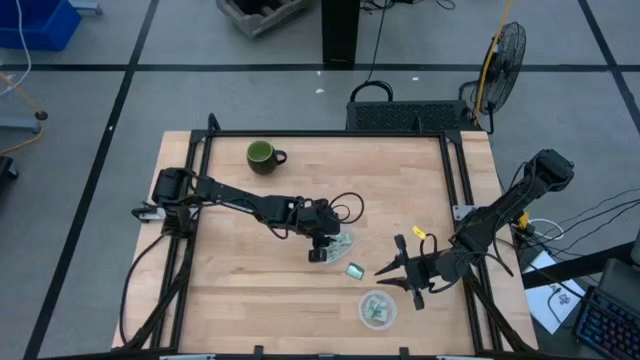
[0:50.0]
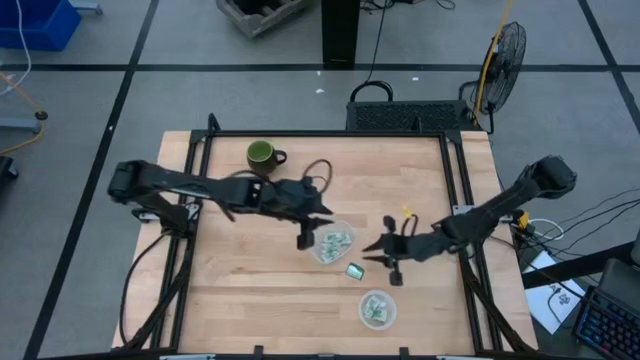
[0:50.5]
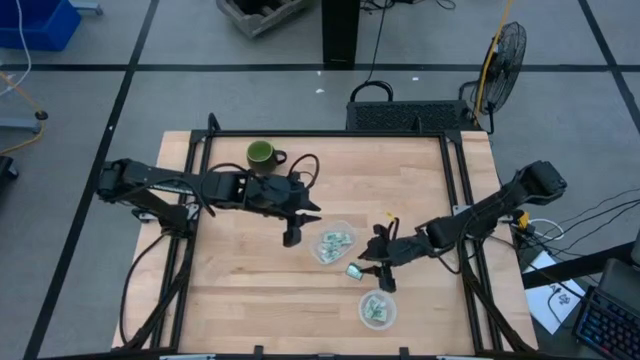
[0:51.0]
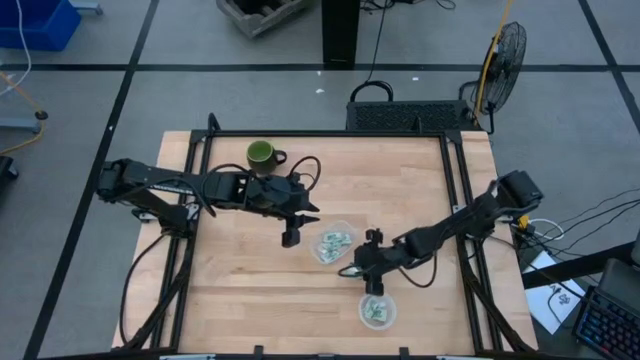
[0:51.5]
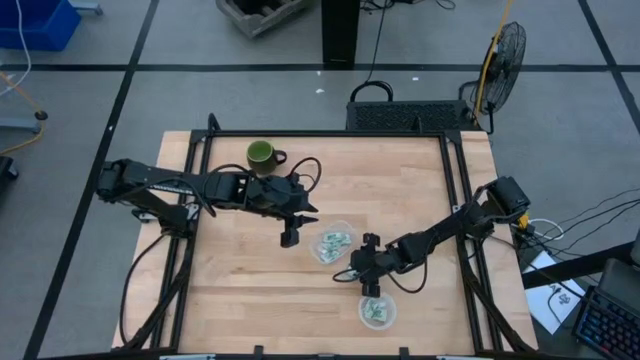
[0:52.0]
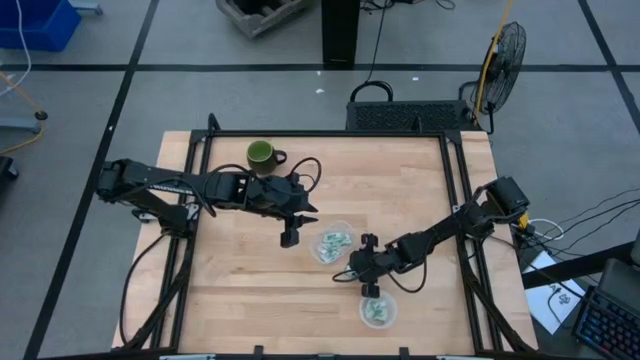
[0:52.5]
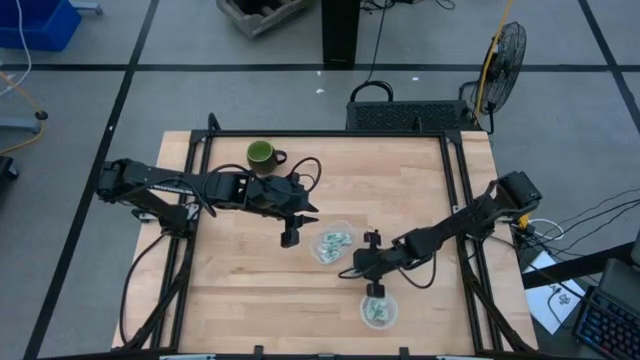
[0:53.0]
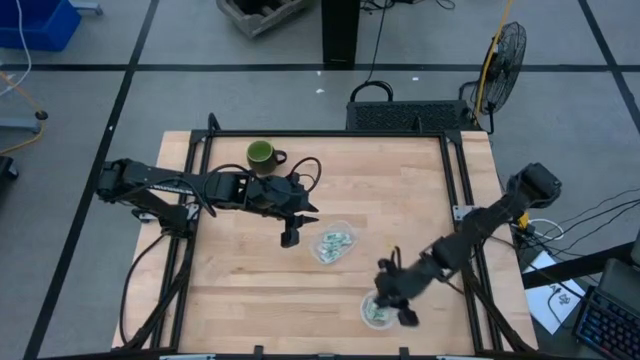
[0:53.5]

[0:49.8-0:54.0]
Task: Pick and place Stevia / Truvia into bins
Put the truvia packet into the bottom transparent container

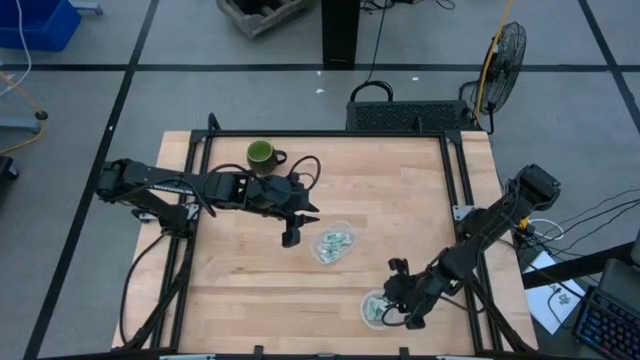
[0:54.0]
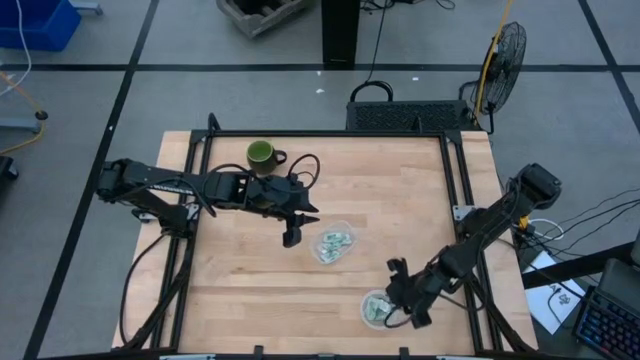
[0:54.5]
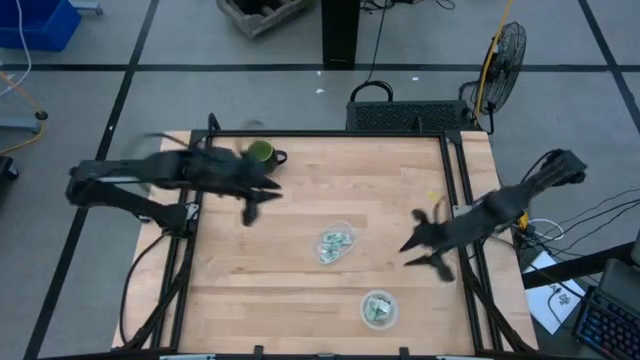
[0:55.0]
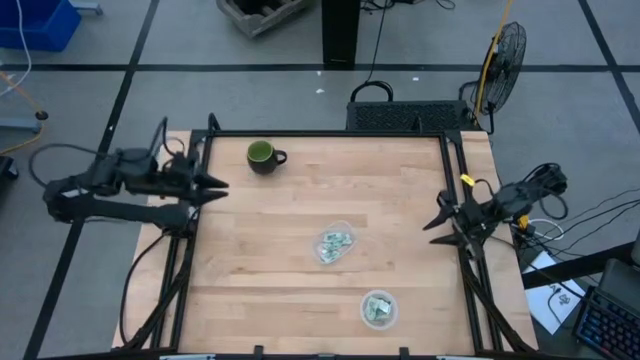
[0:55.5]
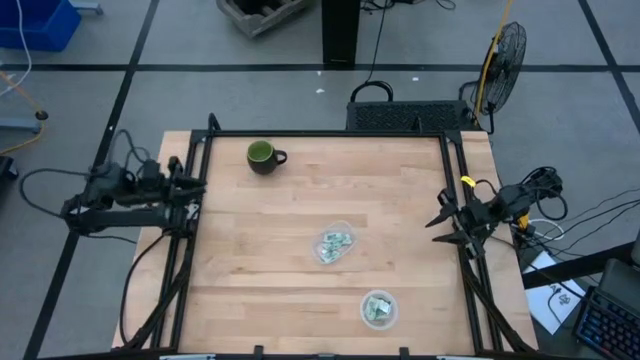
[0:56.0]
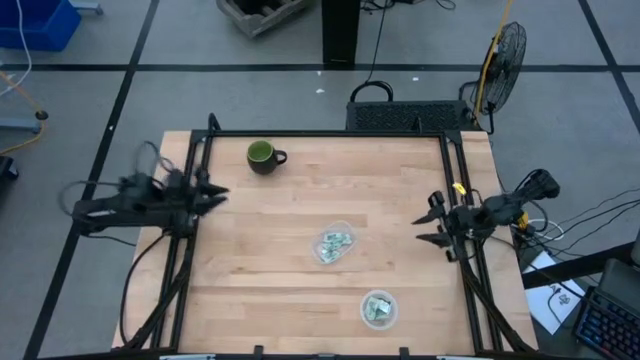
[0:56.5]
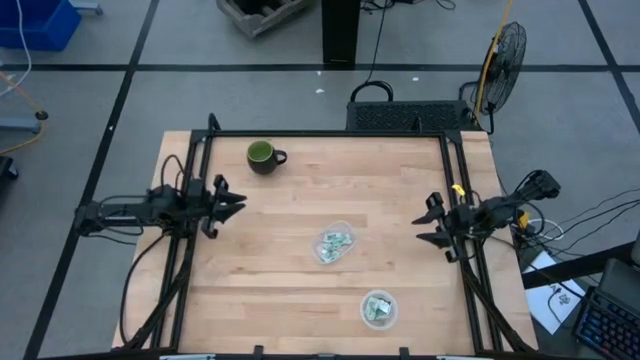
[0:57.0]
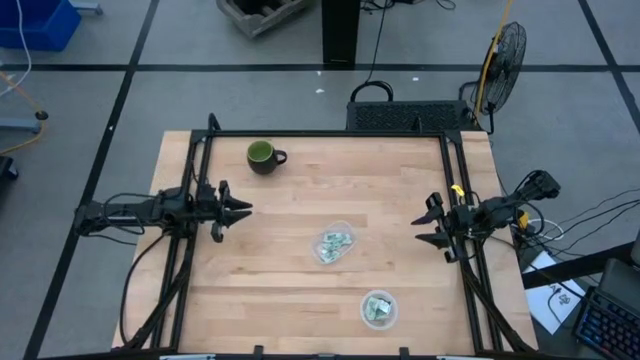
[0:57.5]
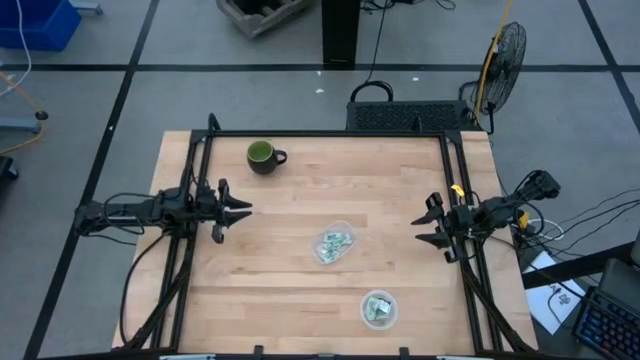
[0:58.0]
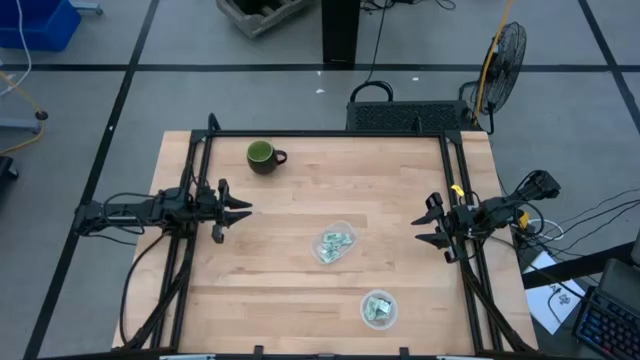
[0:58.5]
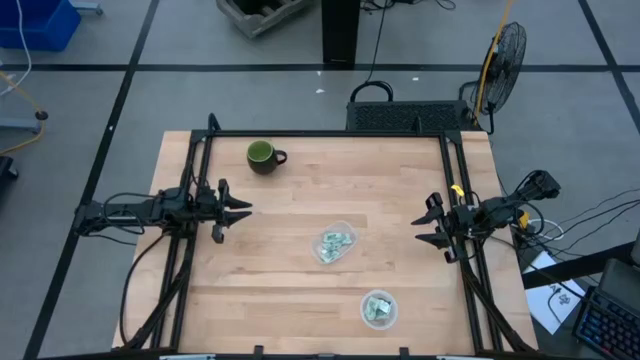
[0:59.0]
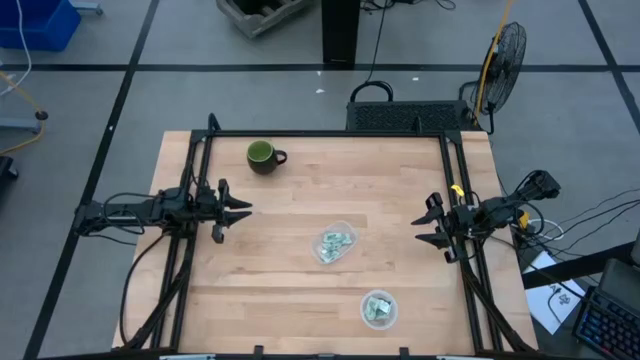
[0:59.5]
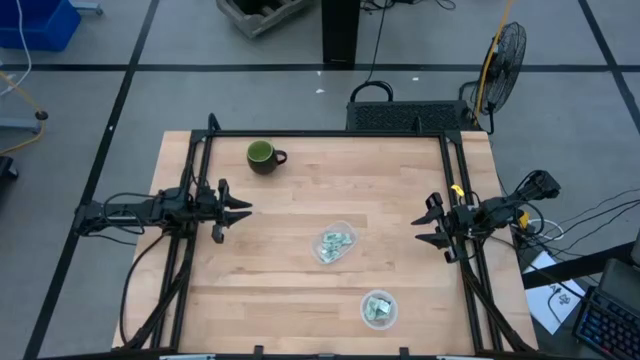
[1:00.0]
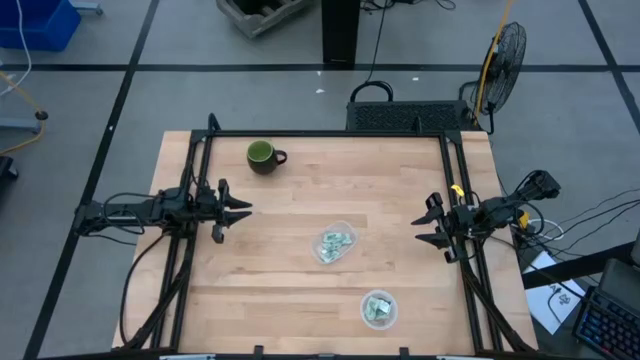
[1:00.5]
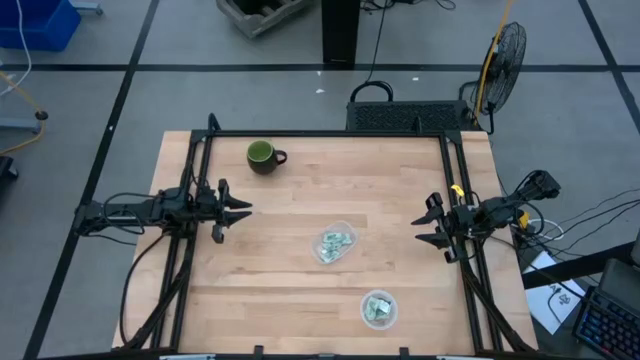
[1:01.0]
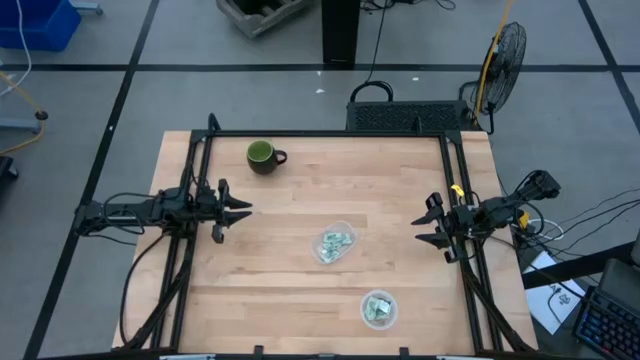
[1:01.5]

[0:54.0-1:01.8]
Return to Home Position

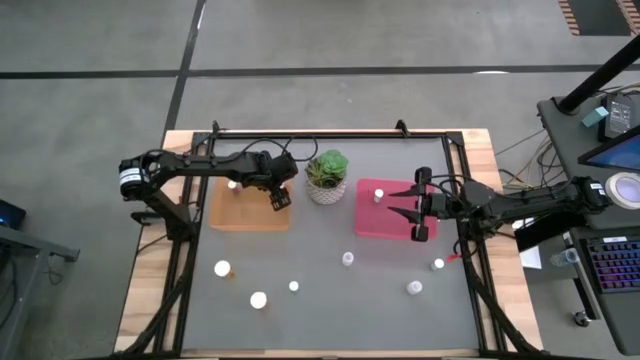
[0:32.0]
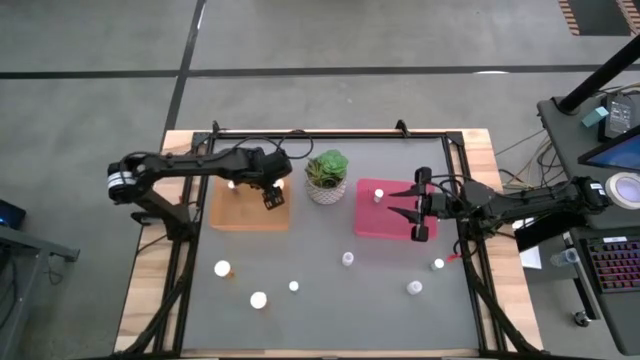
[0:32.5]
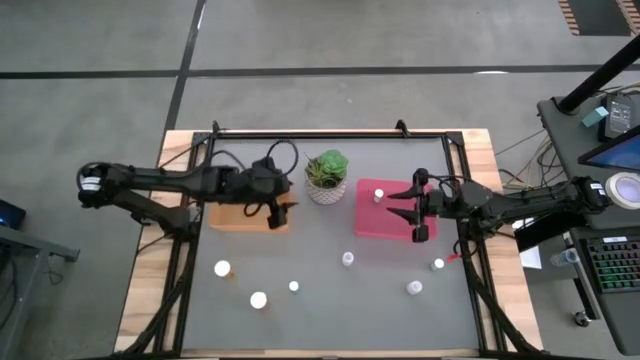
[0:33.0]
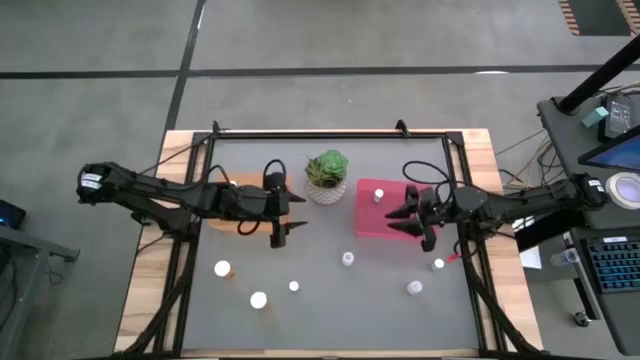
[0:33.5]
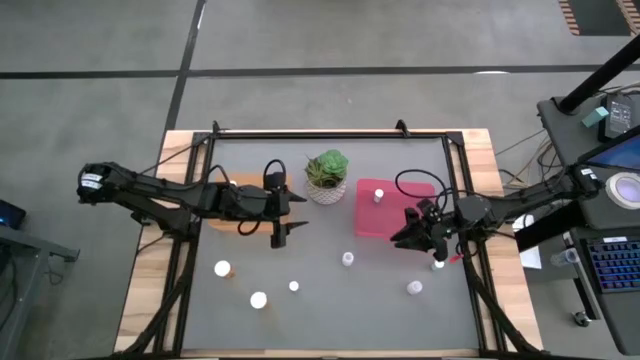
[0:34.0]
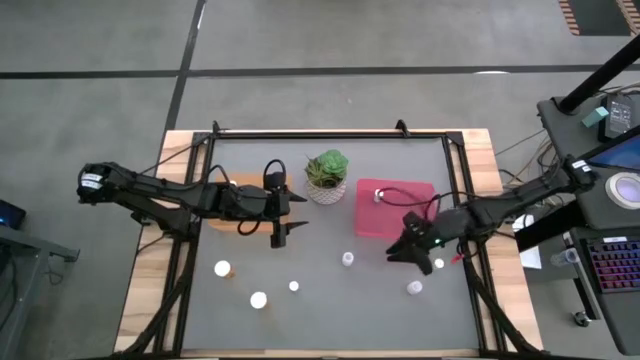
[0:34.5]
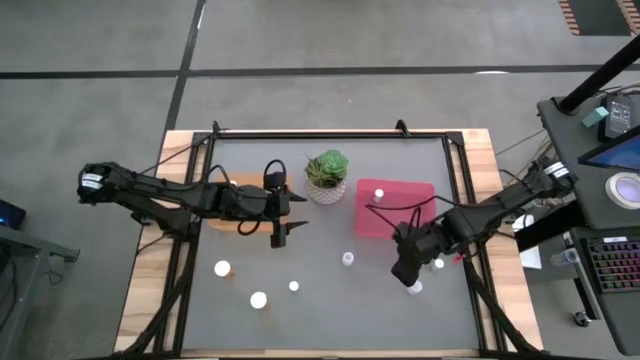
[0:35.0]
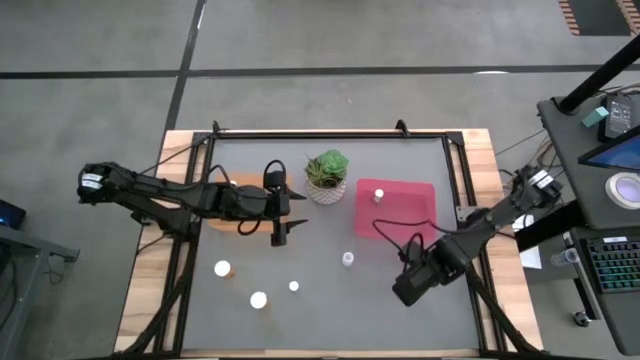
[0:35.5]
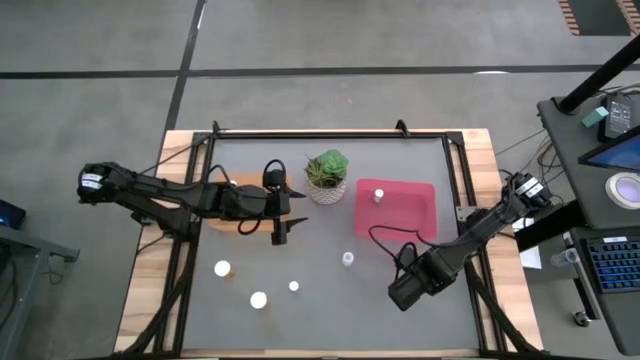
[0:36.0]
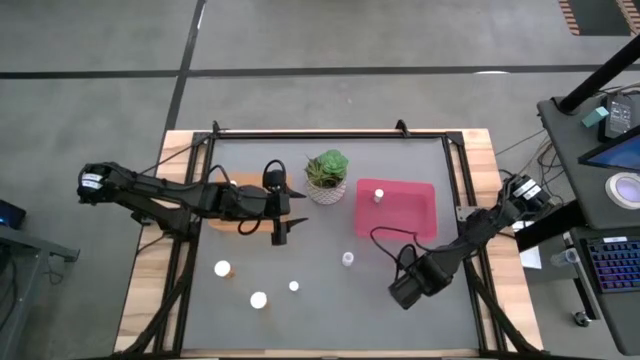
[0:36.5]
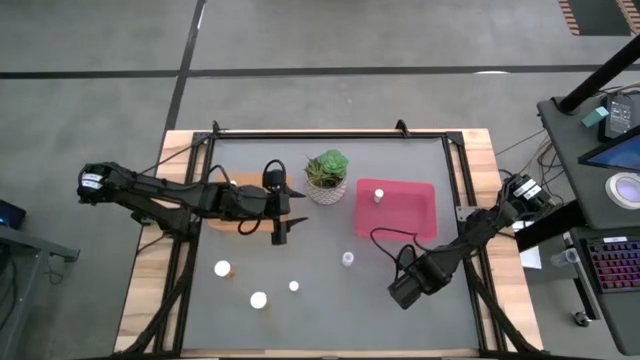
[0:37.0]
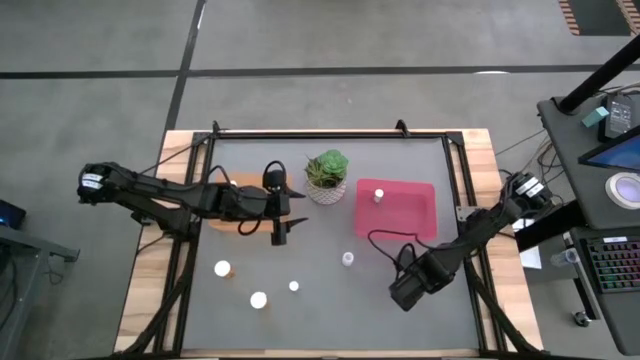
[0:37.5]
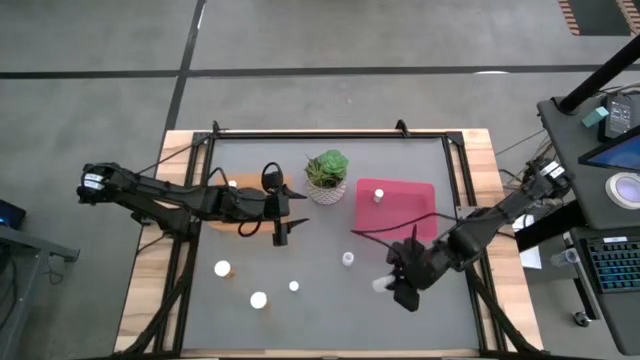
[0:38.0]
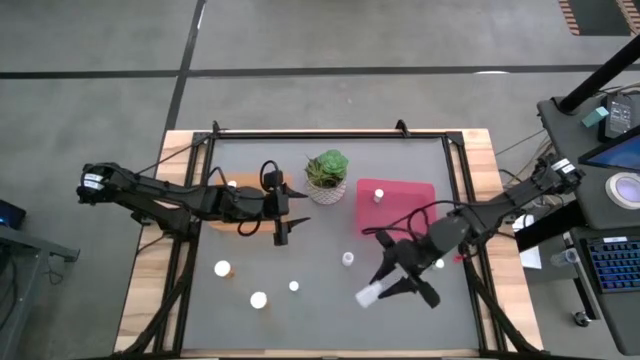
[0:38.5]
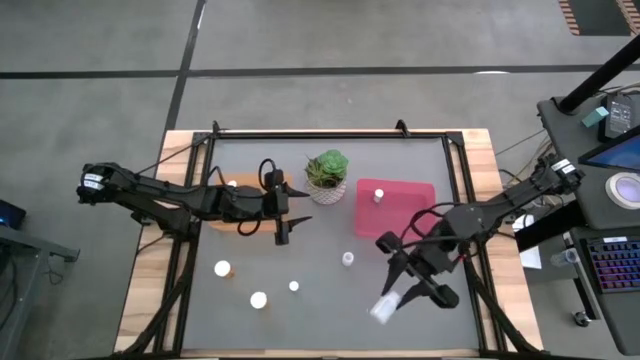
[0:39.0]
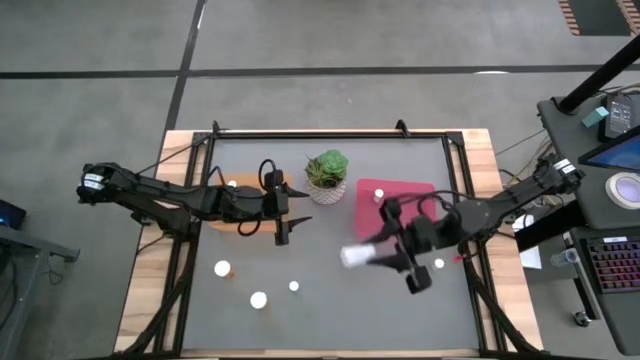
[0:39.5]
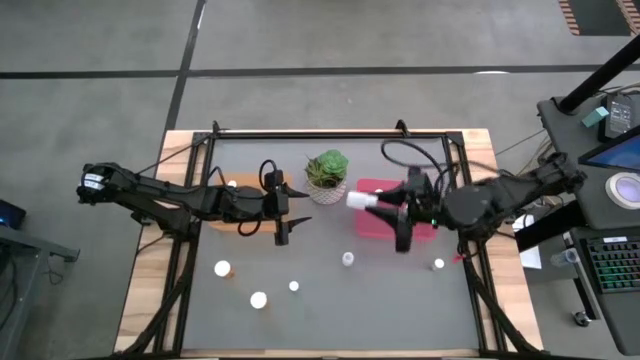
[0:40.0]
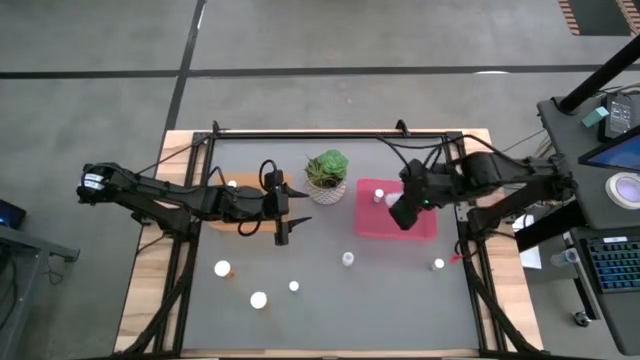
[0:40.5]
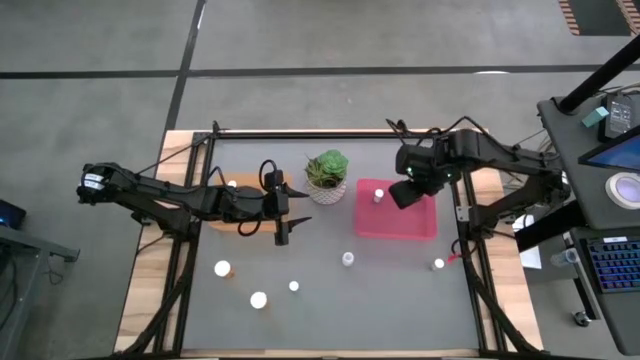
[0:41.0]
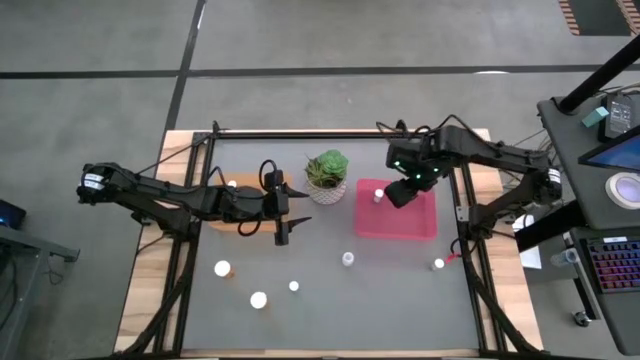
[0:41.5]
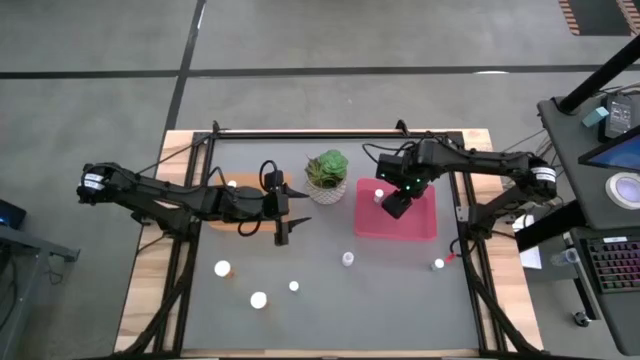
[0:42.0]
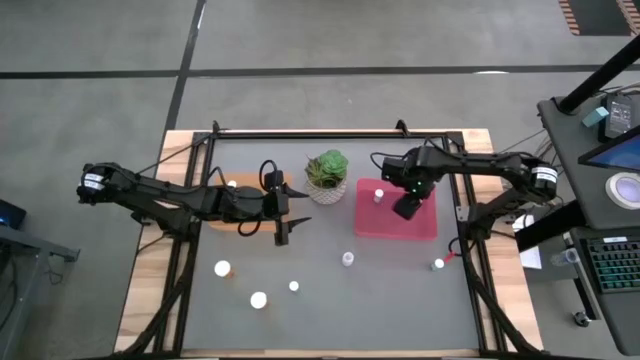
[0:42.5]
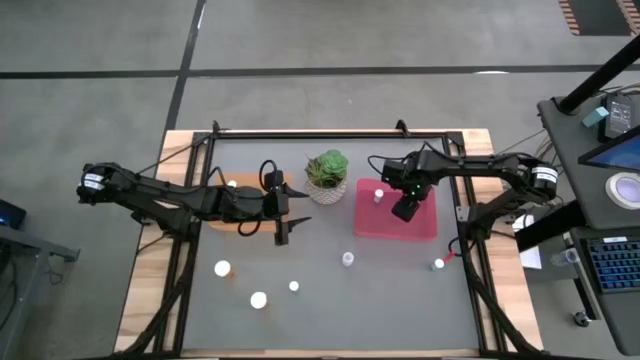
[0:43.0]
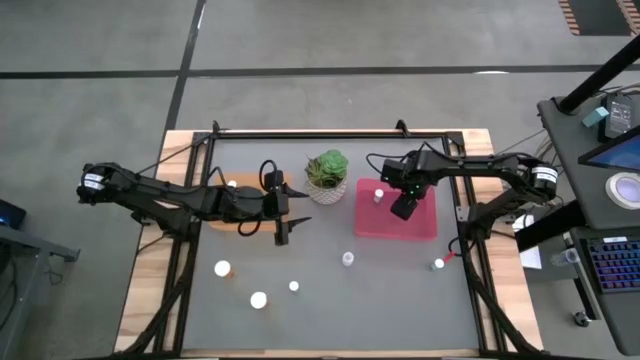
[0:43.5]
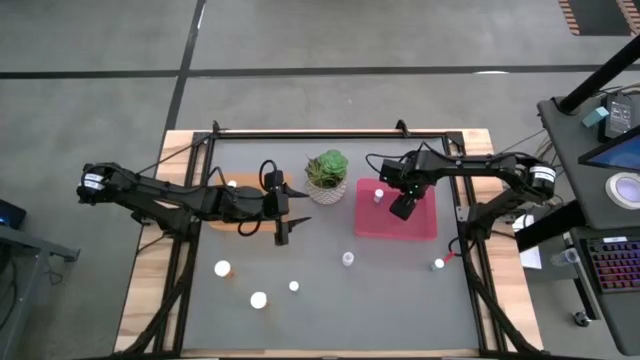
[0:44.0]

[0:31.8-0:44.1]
Task: Pick and place medicine bottles into bin by pill shape (circle, oval)
Put the right small white pill bottle in the pink bin
